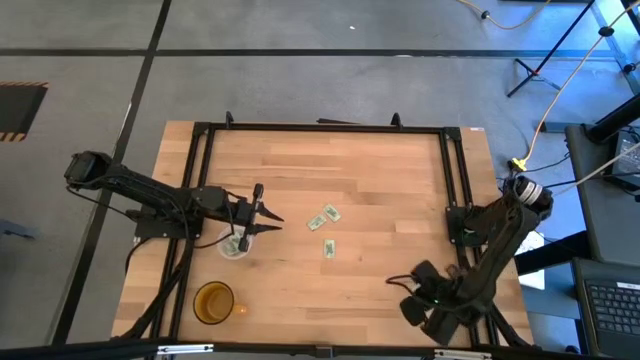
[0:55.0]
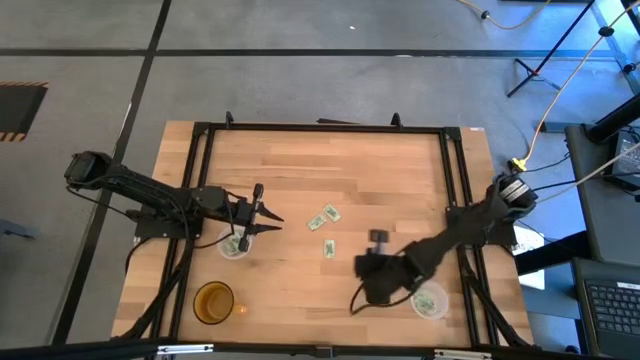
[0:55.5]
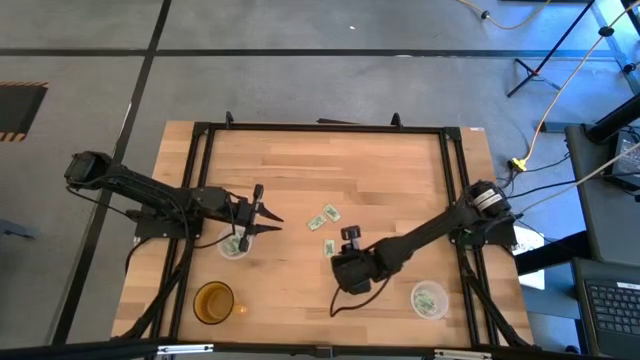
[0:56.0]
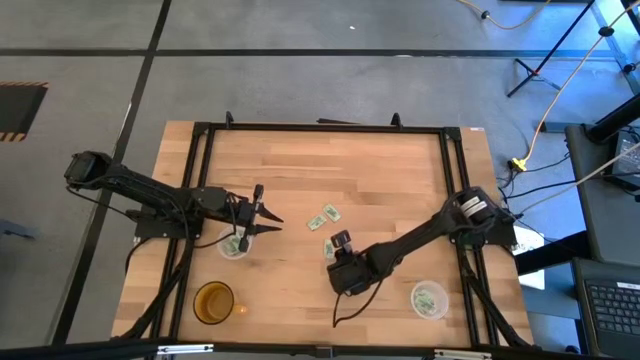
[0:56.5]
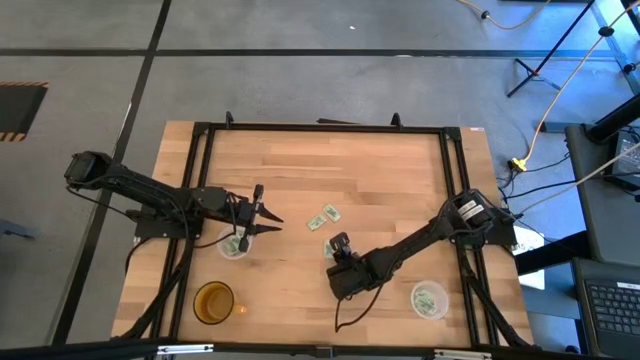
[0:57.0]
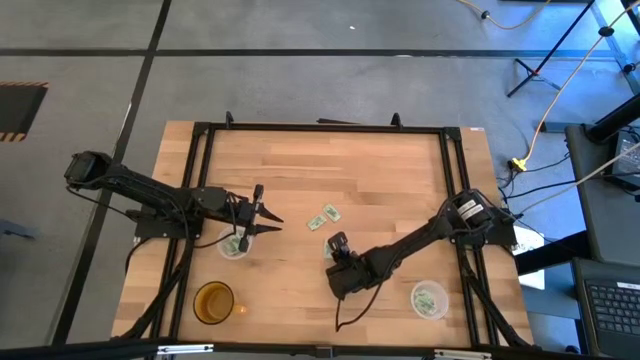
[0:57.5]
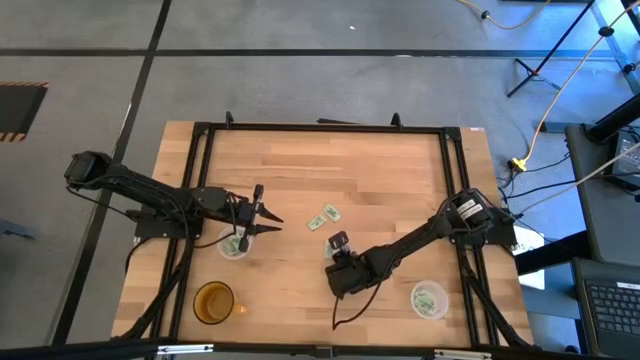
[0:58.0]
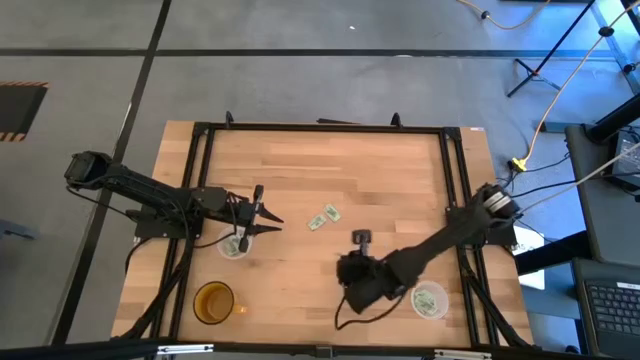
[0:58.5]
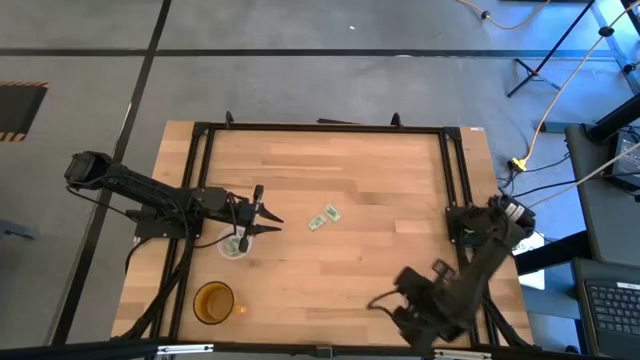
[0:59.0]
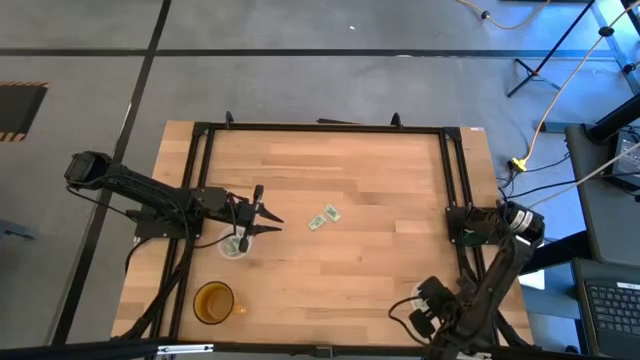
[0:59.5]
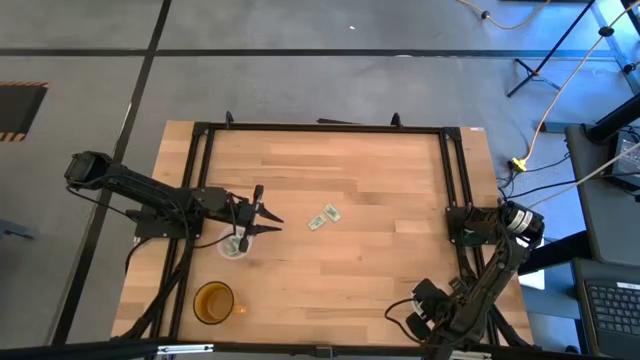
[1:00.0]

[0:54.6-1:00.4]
Task: Pick and place items into bin
Put the green stevia packet into the right transparent bin

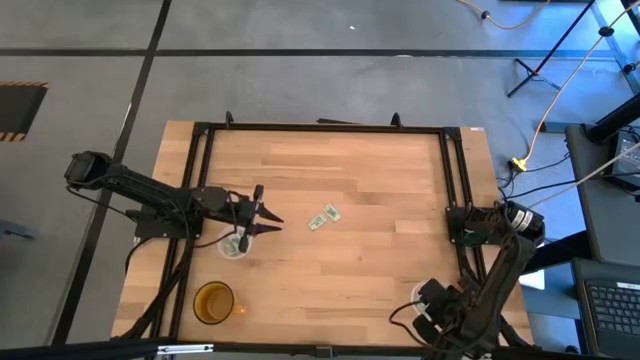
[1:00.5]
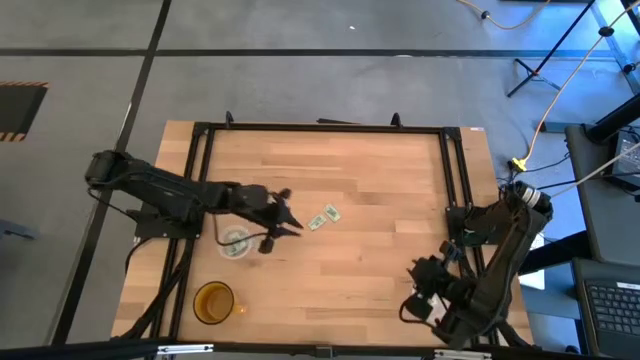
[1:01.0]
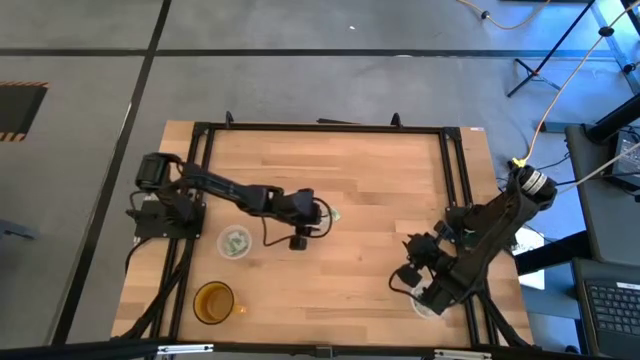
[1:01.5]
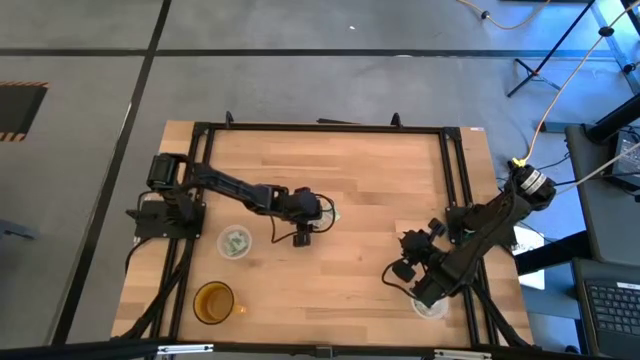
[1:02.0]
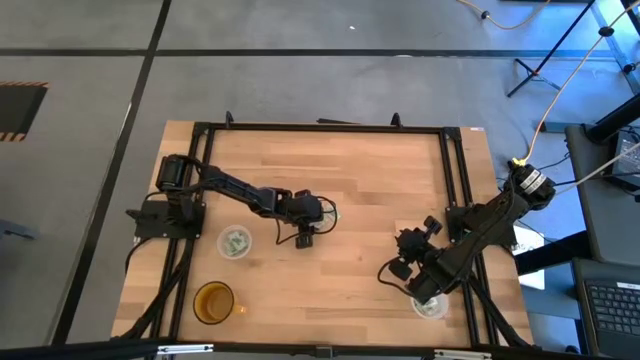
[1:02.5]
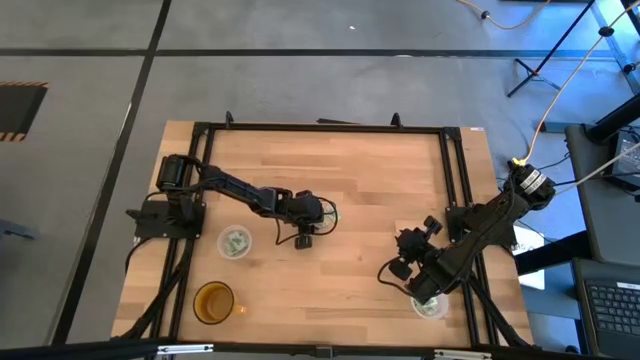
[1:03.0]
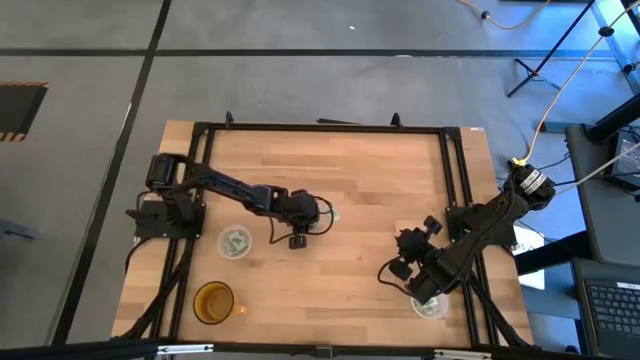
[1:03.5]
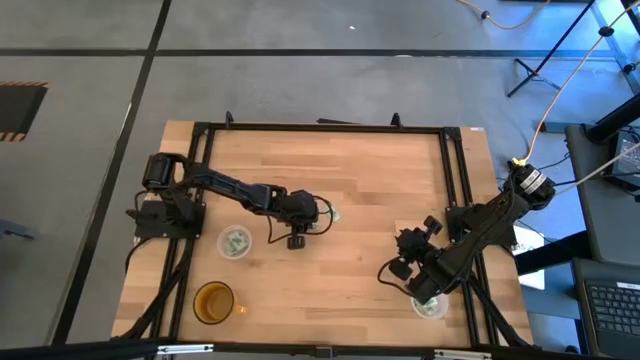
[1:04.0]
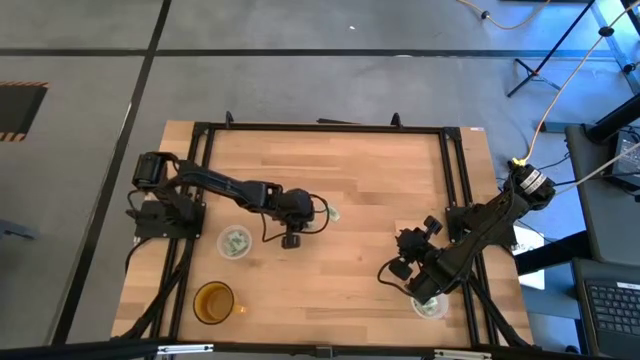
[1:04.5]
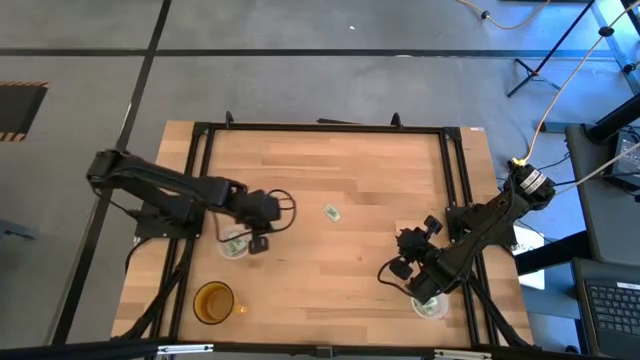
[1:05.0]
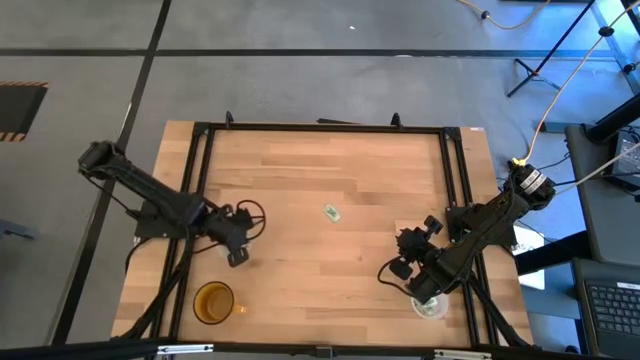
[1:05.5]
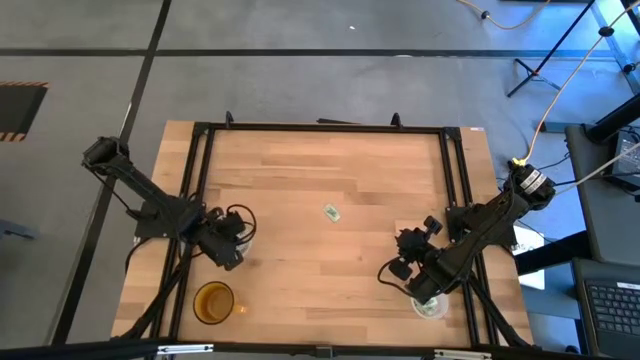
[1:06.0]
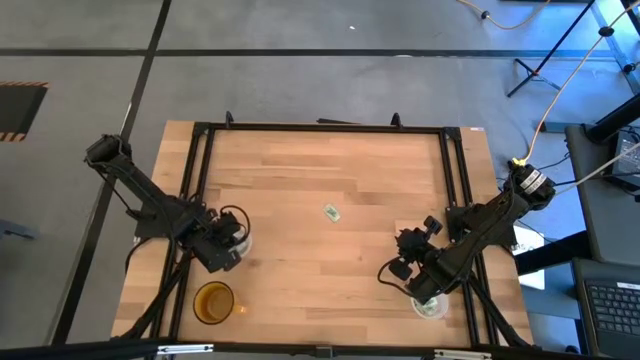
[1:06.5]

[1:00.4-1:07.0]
Put the green stevia packet into the left transparent bin

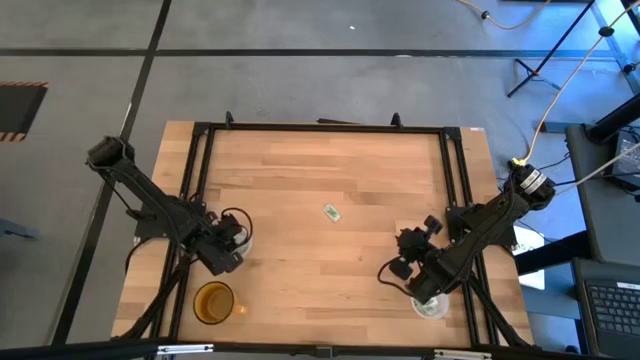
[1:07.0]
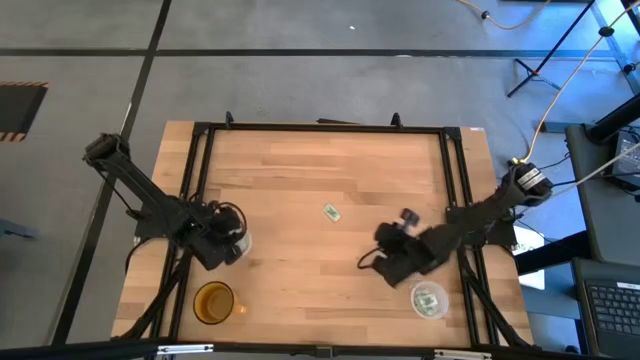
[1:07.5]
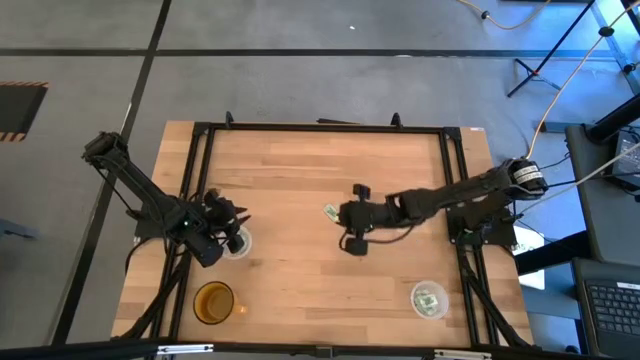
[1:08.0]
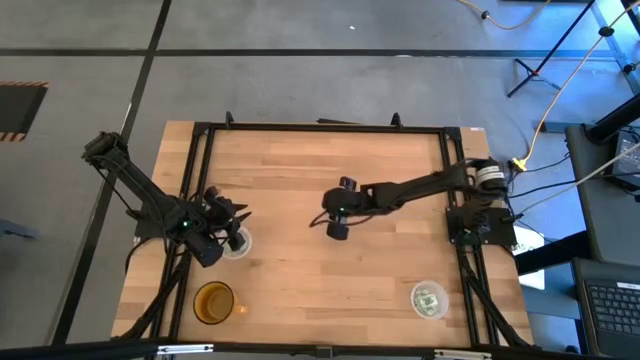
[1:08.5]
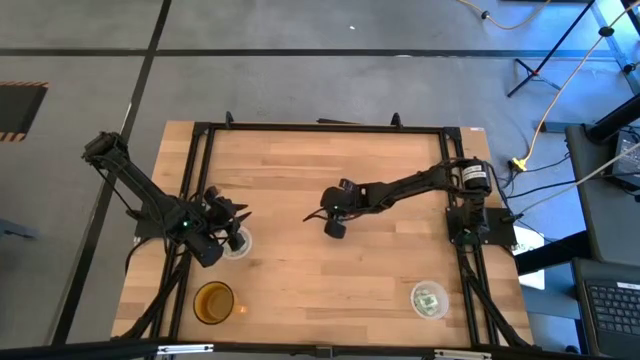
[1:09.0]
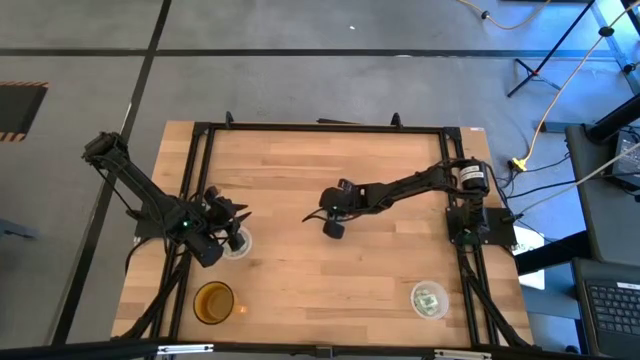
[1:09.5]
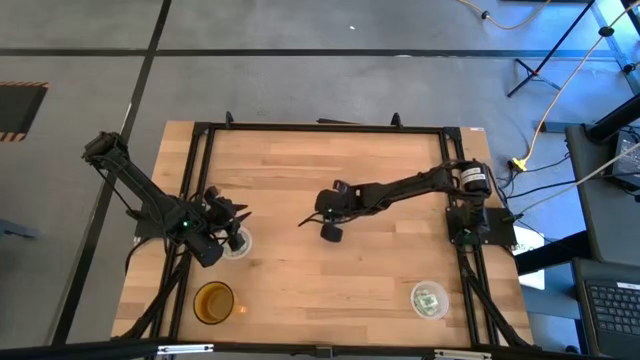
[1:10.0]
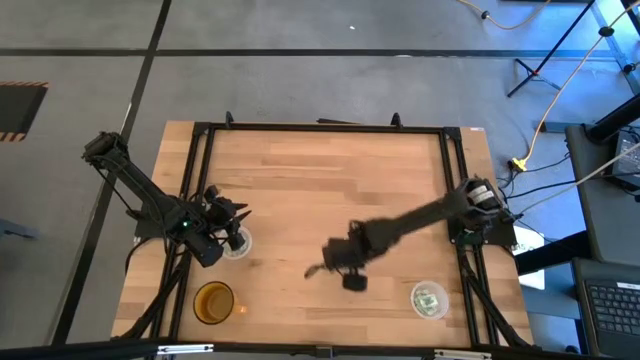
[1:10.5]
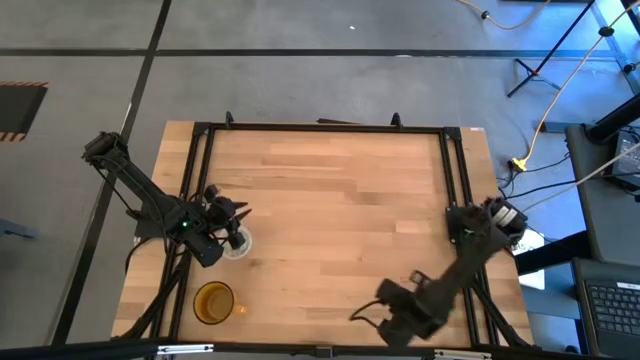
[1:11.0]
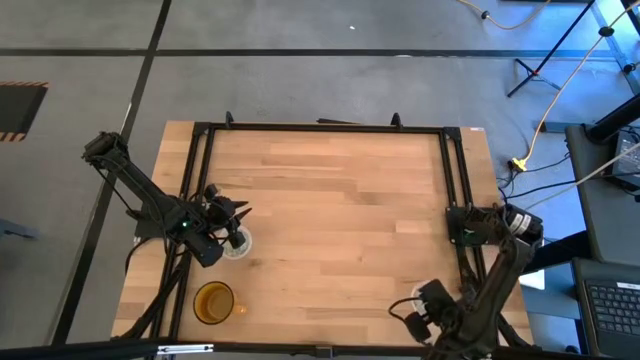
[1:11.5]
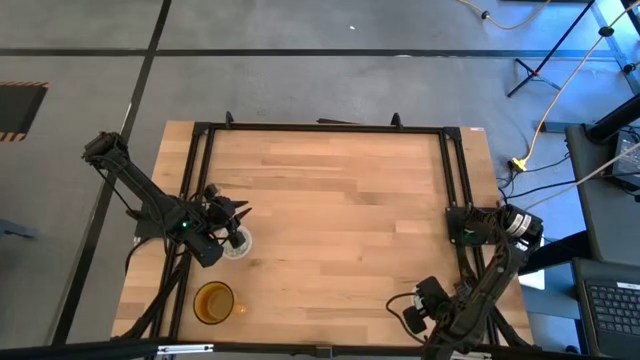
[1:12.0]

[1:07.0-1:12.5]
Put the green stevia packet into the right transparent bin

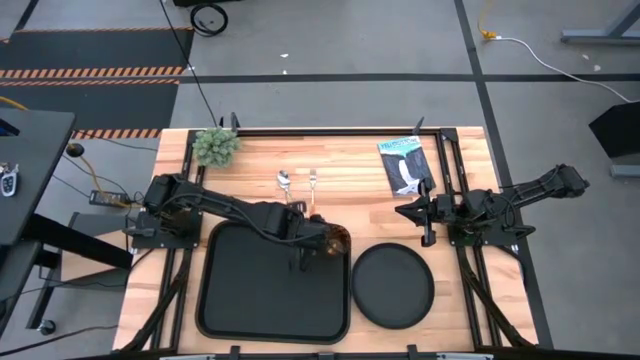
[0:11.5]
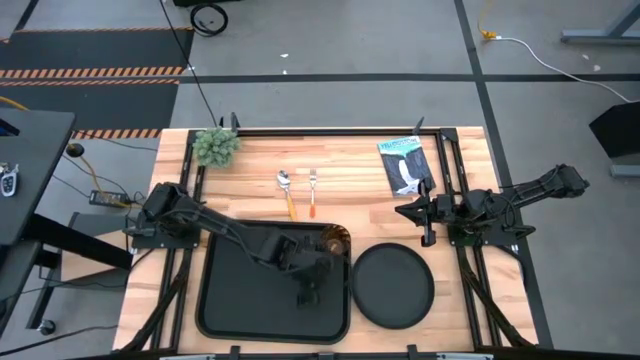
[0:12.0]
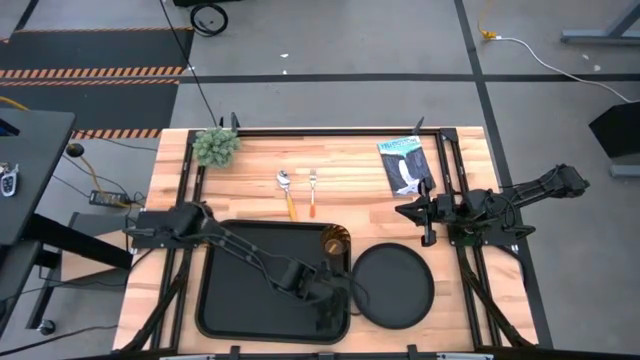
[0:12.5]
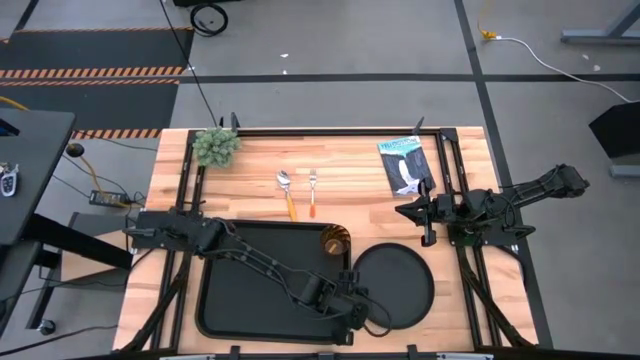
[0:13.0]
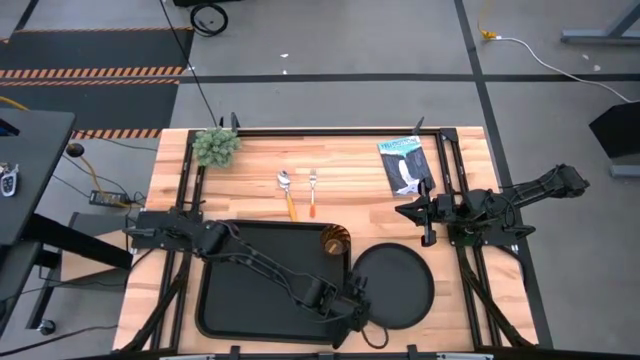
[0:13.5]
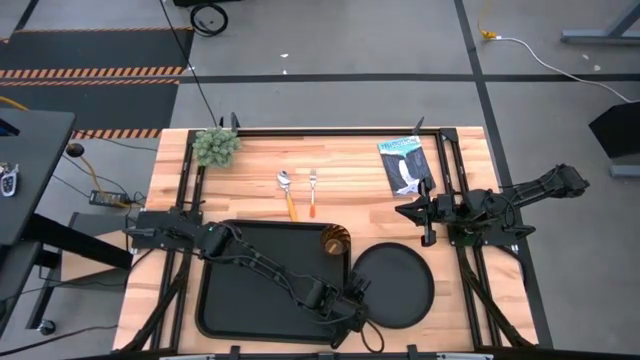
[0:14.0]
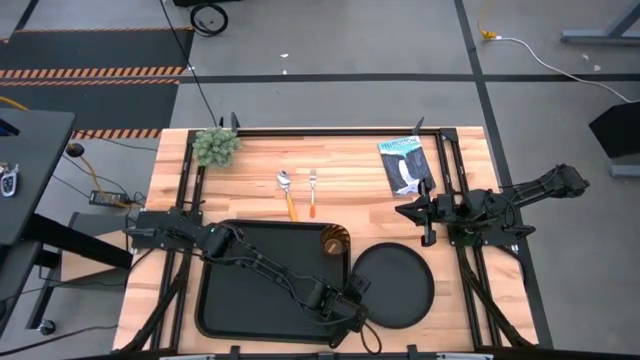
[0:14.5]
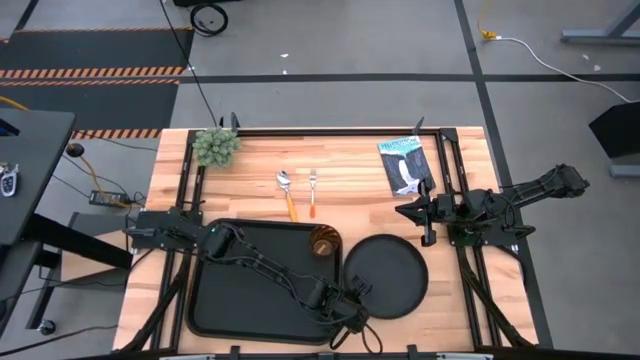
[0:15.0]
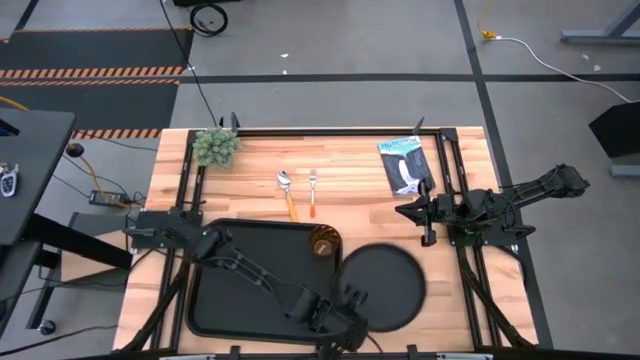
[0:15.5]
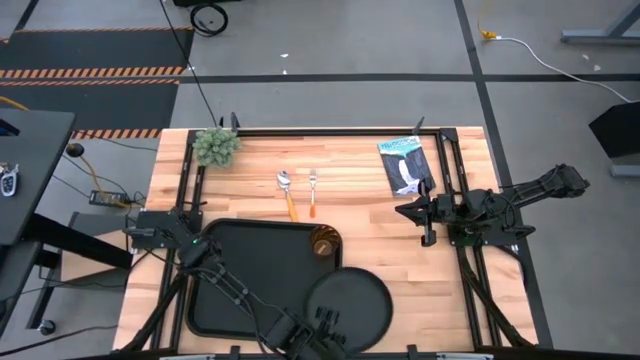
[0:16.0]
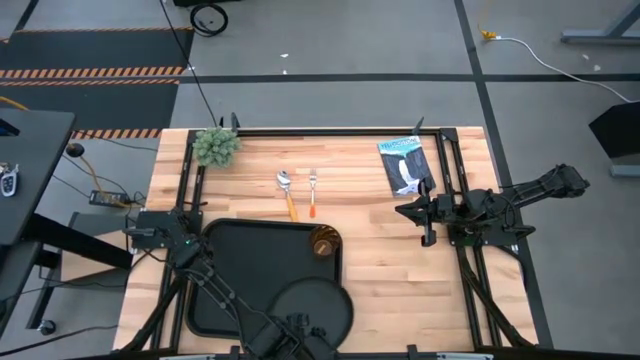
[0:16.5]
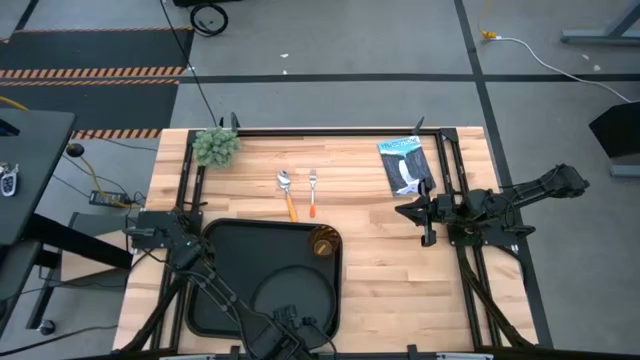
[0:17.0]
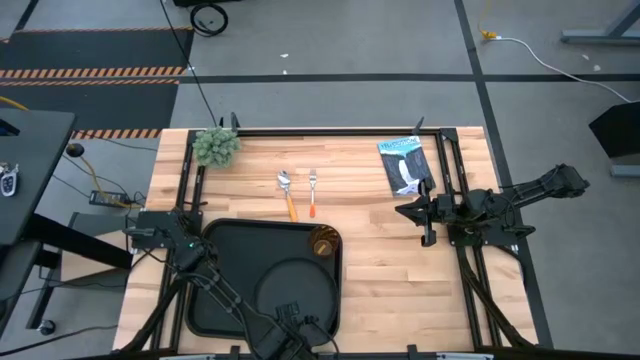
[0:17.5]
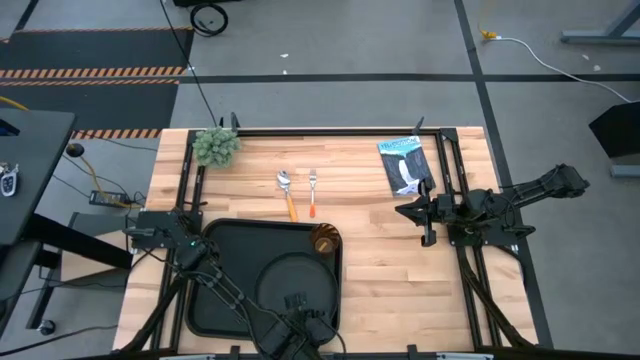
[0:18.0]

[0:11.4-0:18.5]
Task: Pick and place plate/cup/fork/spoon on tray
Put the black plate on the black serving tray
